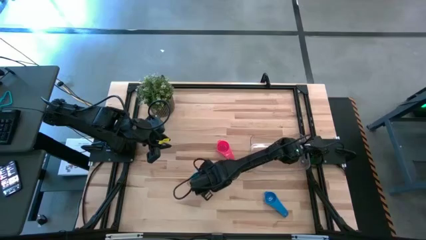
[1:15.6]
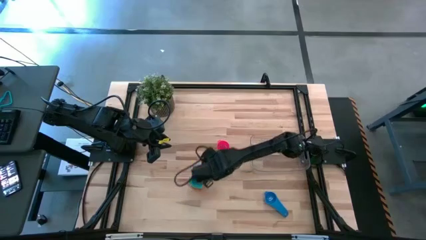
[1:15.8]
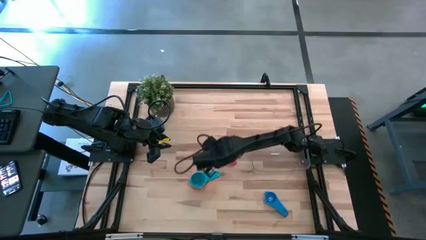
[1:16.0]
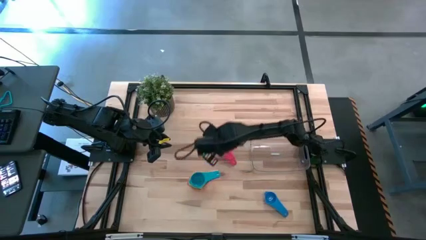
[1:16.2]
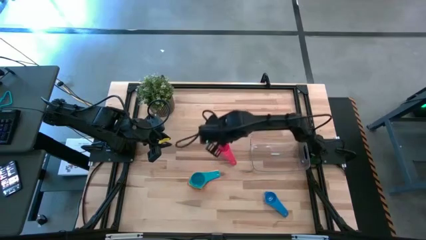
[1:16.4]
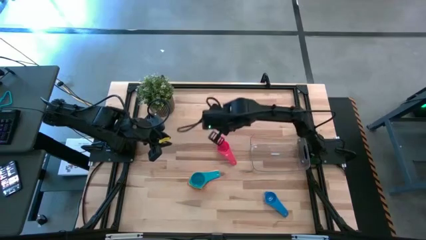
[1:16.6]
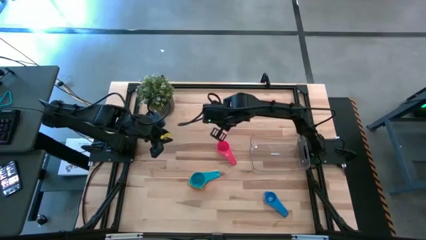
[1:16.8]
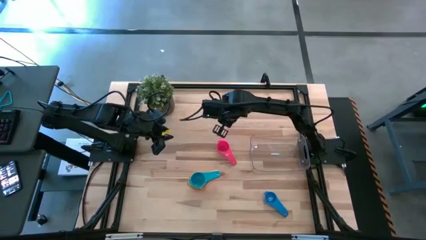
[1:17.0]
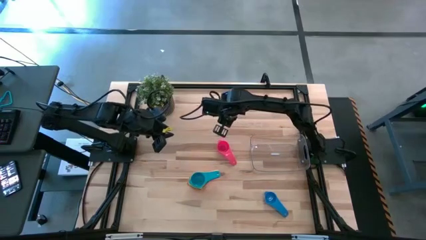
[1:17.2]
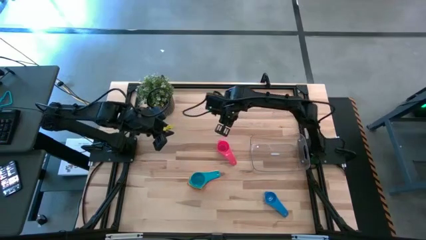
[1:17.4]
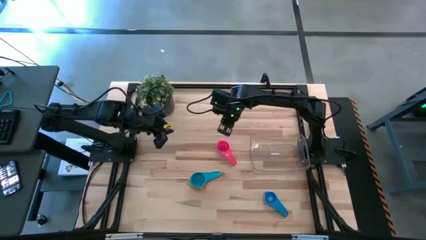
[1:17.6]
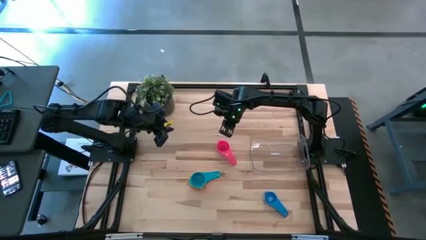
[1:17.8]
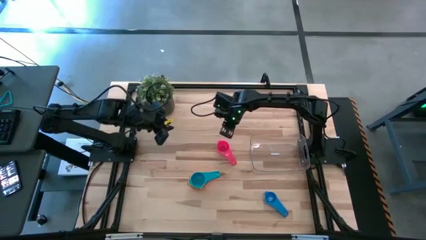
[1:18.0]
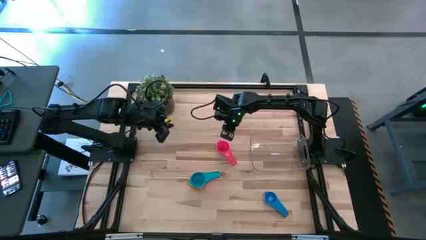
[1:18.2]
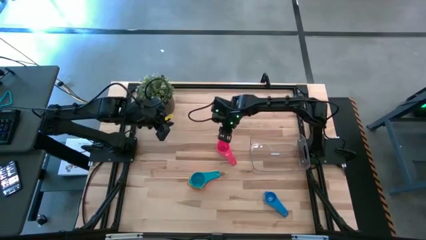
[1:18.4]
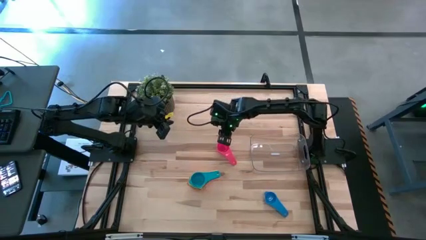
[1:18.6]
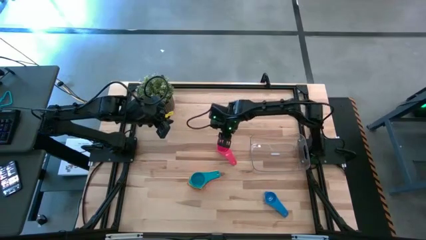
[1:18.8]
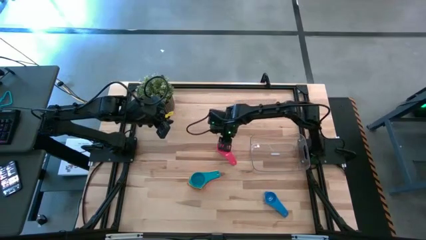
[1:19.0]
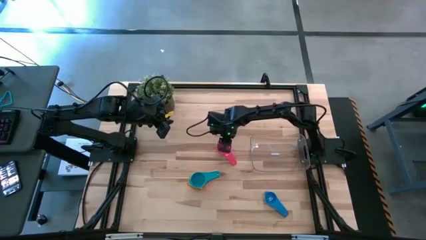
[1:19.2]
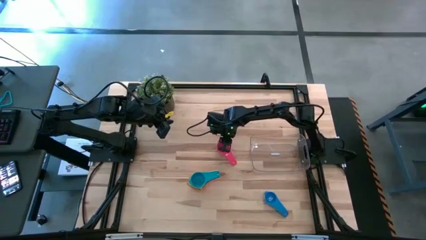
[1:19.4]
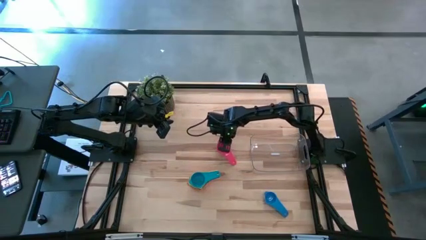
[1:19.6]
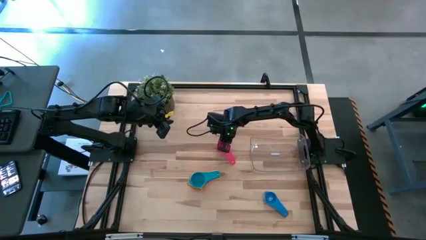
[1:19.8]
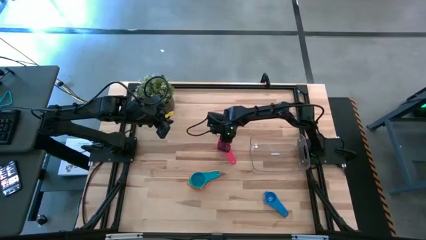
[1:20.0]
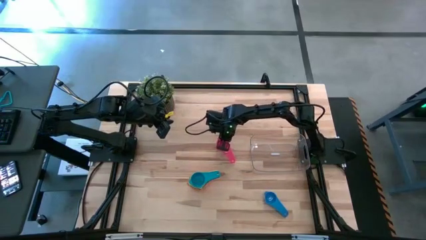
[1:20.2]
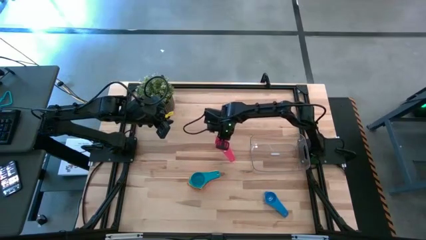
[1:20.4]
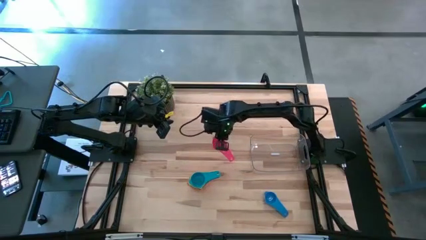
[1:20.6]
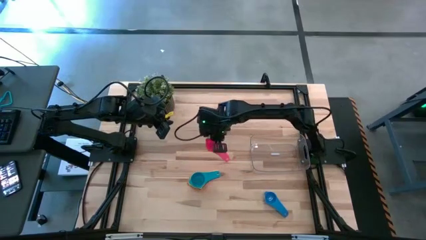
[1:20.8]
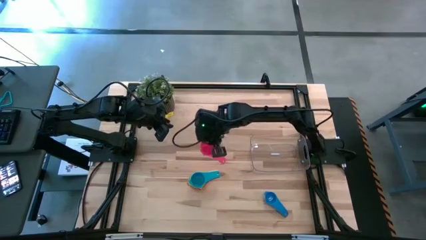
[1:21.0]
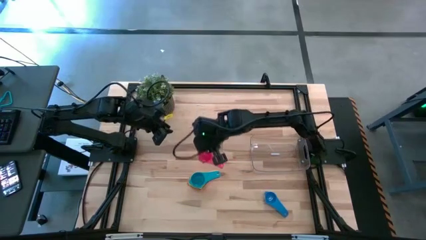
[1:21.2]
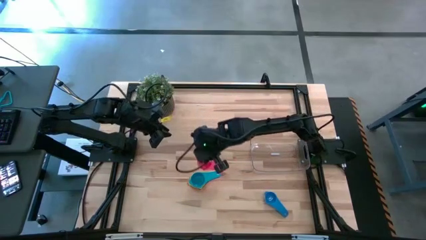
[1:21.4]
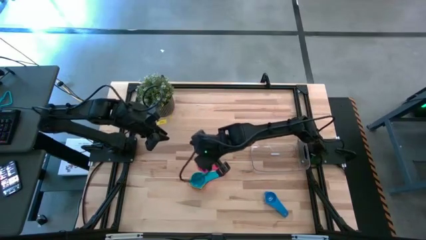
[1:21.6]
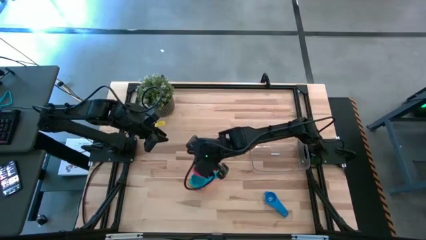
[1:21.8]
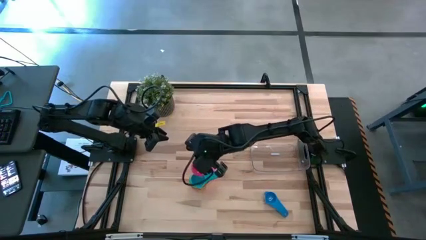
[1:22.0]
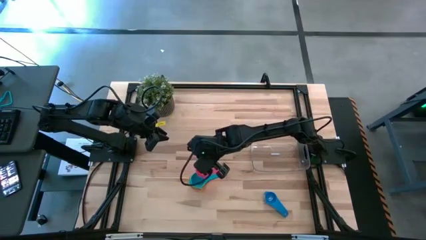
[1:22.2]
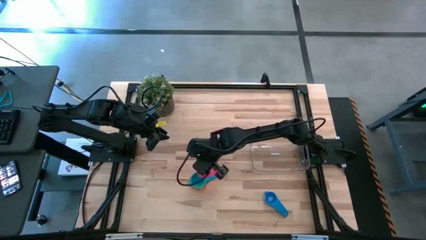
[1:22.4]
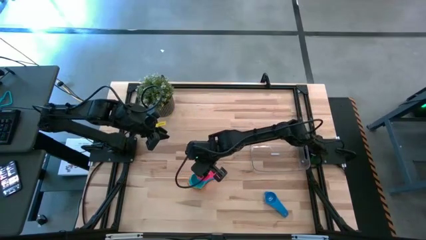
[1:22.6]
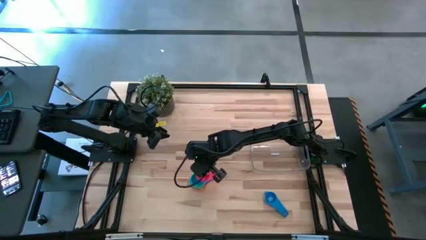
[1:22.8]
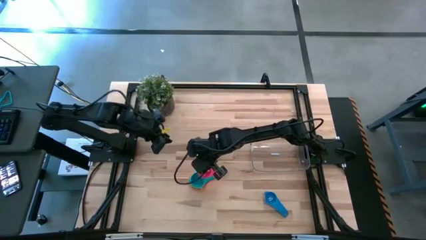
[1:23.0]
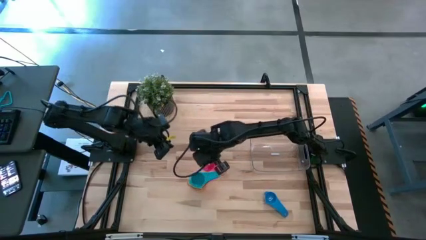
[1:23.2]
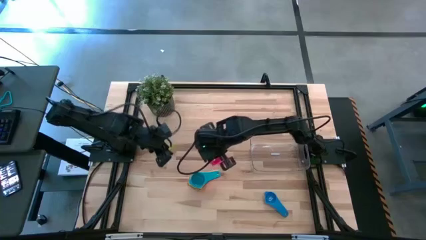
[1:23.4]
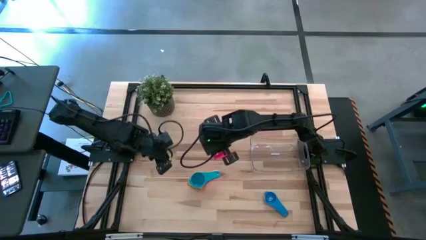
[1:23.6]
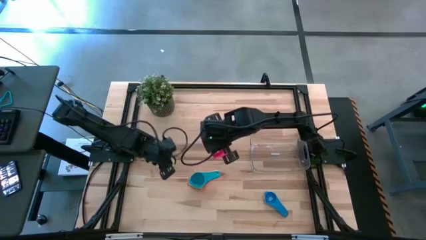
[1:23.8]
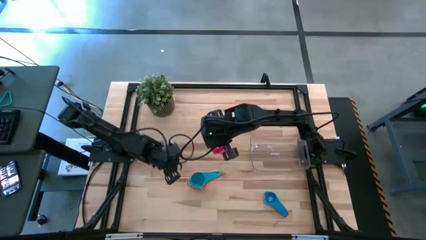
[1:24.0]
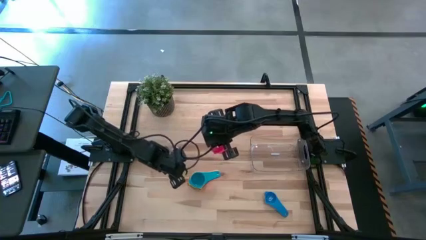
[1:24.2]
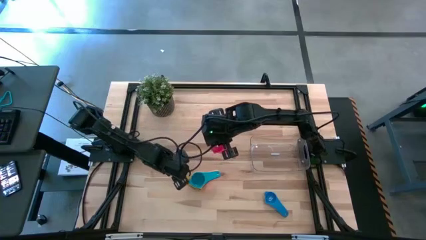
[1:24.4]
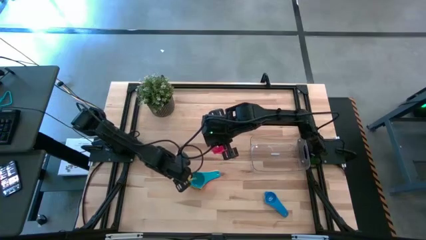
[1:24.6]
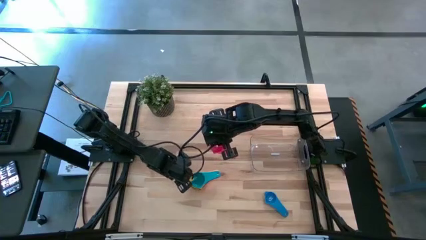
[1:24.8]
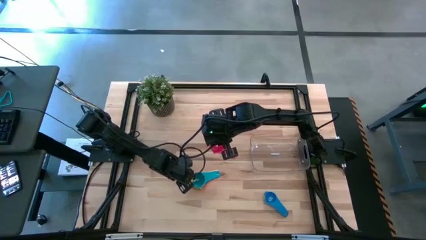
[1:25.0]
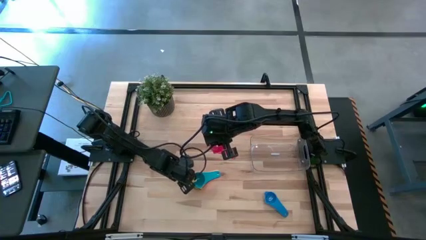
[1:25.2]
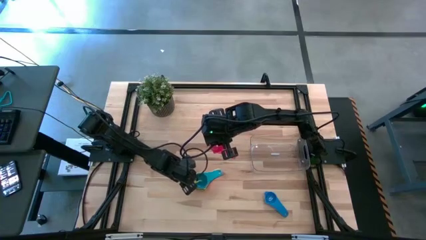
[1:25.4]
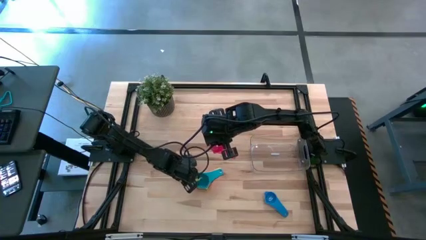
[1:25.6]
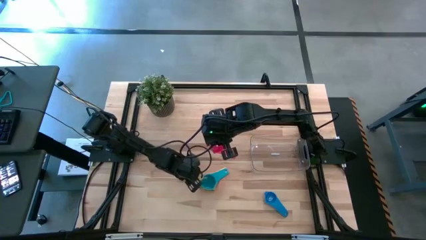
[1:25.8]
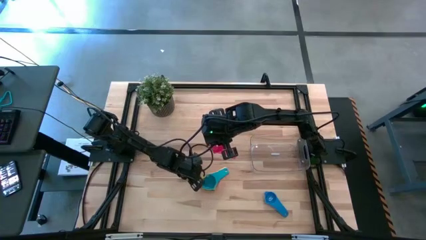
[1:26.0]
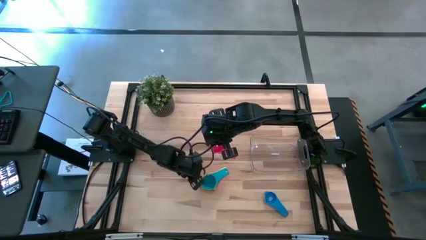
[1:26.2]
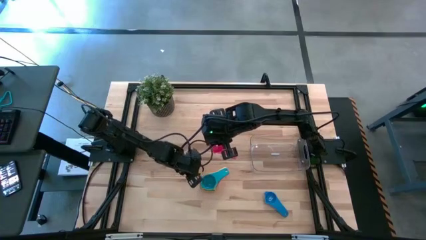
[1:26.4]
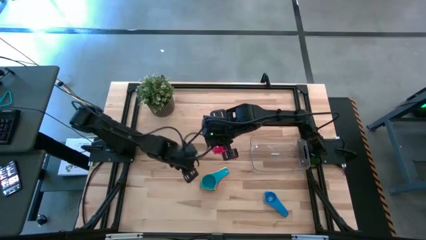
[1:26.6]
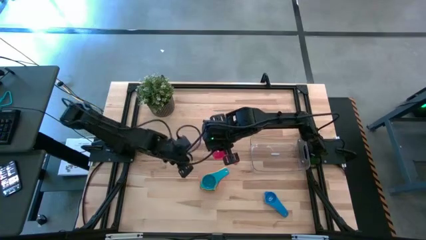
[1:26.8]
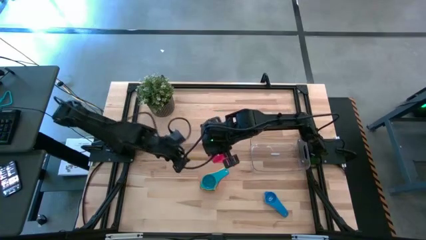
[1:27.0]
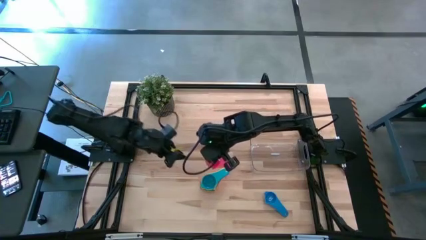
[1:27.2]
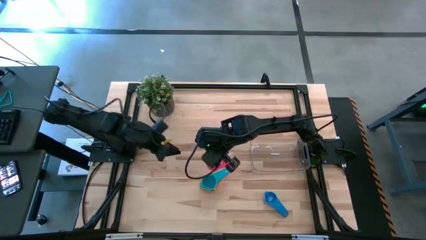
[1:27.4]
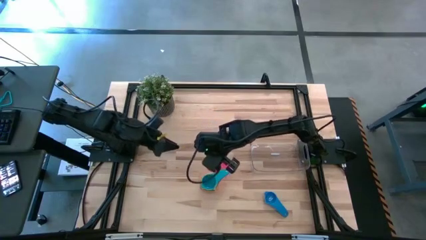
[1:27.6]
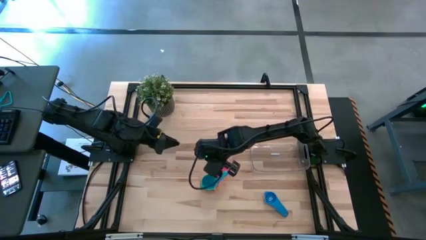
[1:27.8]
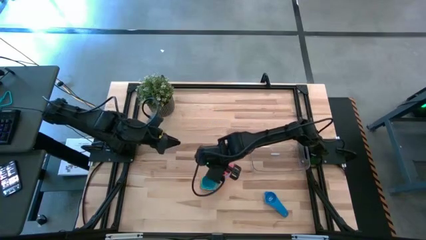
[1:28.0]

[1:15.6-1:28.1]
Task: Nest measuring cups in basket
Stack the red measuring cup on top of the light blue measuring cup

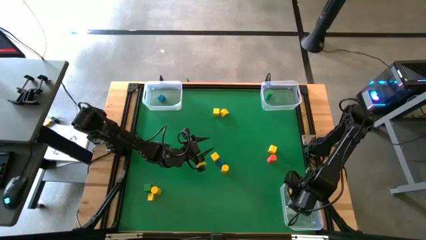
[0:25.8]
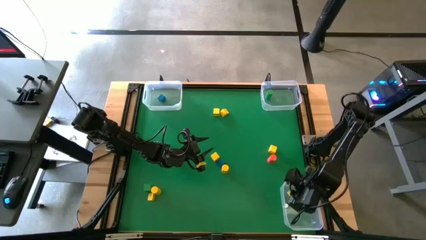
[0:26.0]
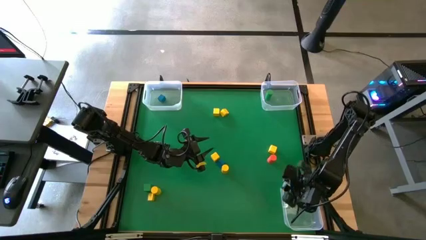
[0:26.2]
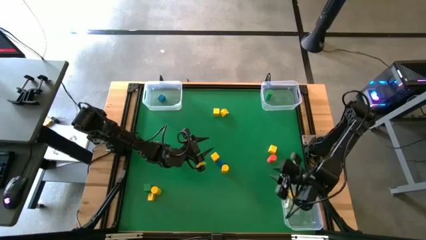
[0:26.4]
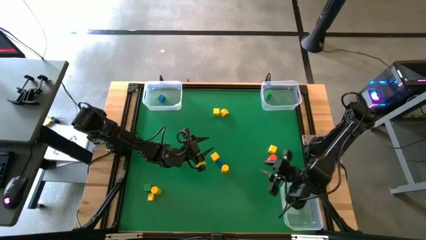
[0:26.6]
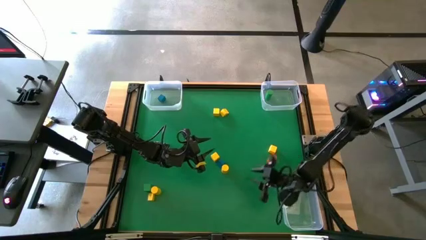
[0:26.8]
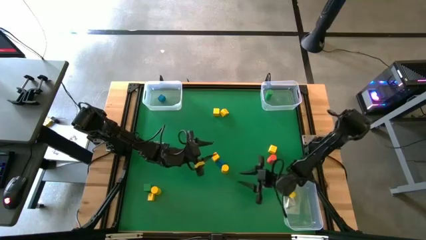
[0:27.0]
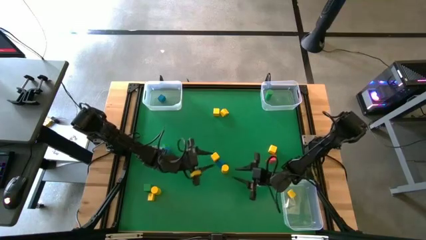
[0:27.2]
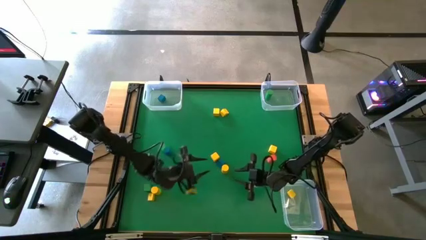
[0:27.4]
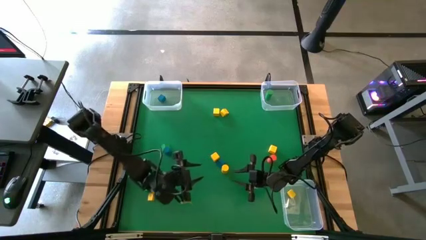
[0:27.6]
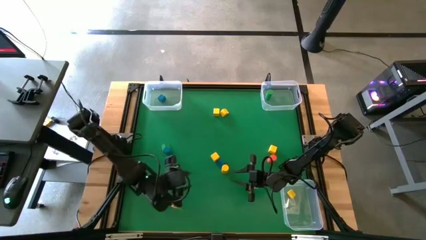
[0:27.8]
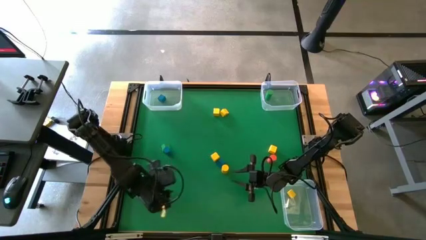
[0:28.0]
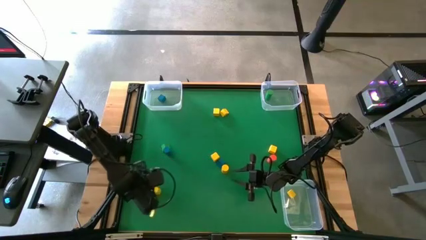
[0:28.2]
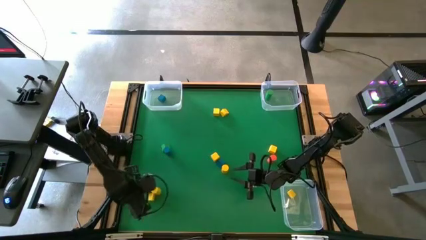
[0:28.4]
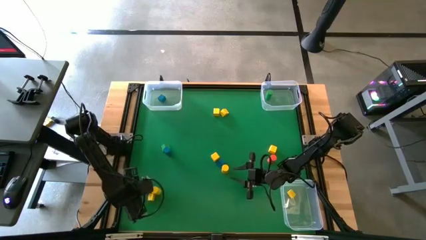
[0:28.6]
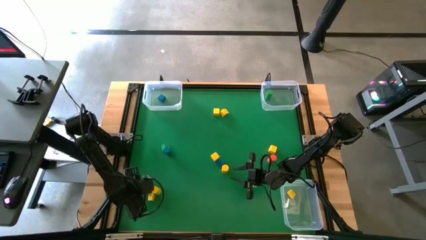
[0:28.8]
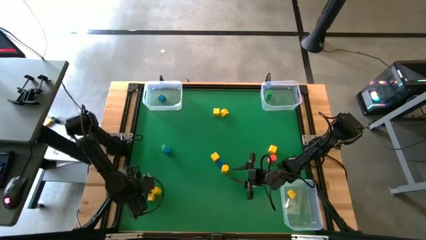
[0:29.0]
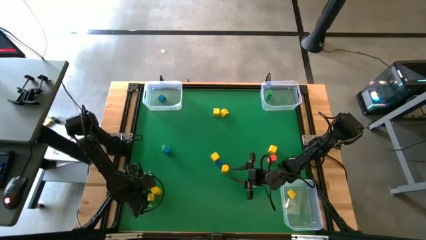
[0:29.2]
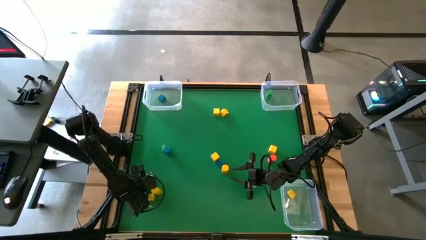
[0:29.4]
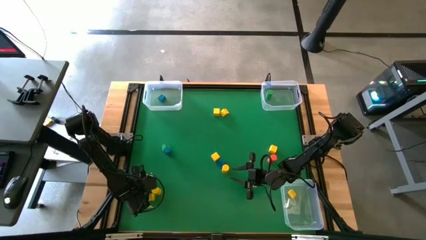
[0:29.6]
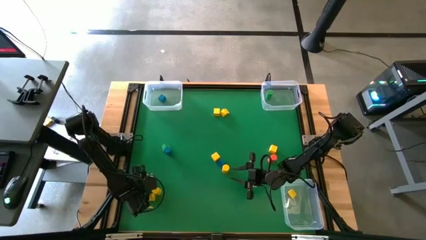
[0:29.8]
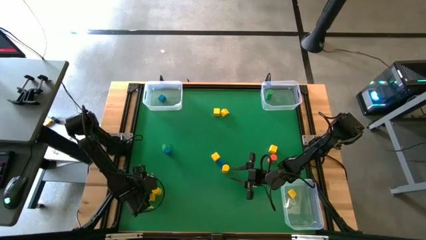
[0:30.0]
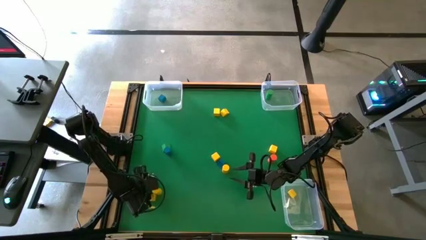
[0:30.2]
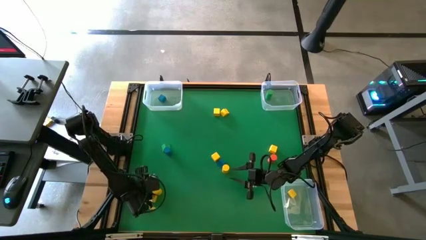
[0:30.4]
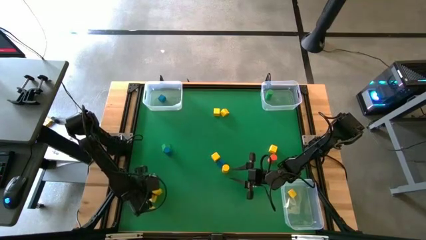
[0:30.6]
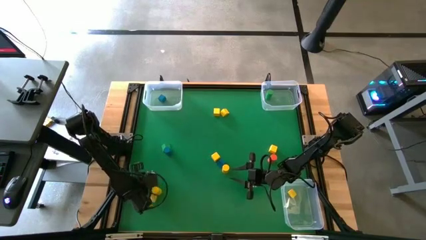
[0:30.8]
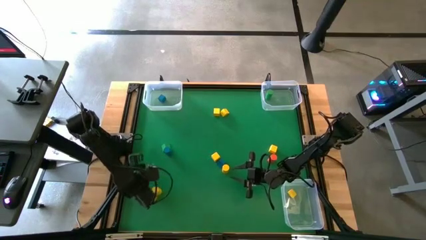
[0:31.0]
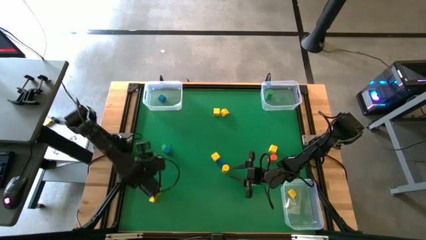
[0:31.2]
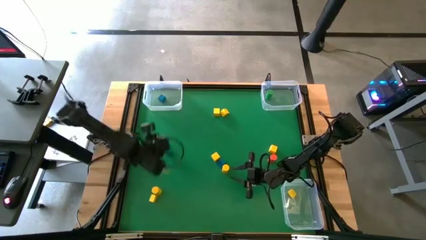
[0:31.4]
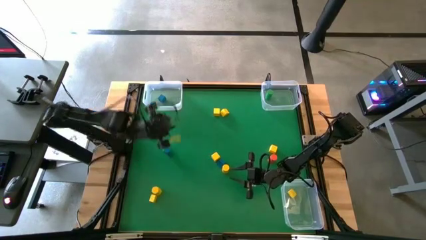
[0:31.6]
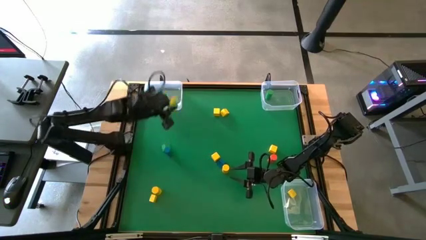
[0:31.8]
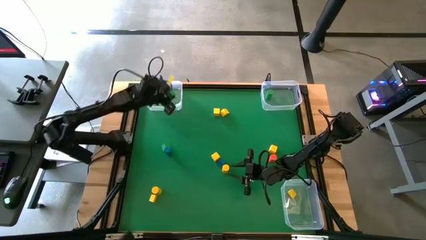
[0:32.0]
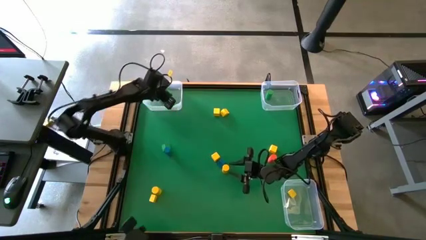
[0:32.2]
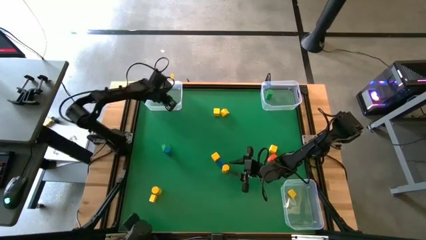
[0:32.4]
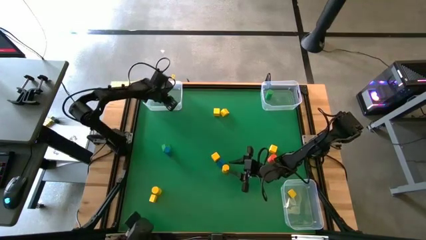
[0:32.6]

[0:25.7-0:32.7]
Task: Sort blocks by size
Put the green cube block into the top left transparent bin
